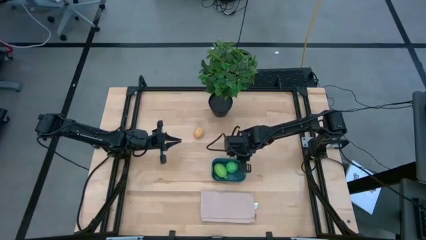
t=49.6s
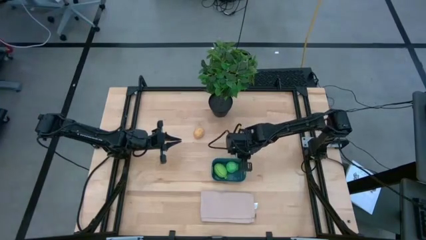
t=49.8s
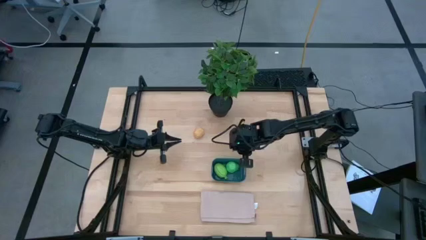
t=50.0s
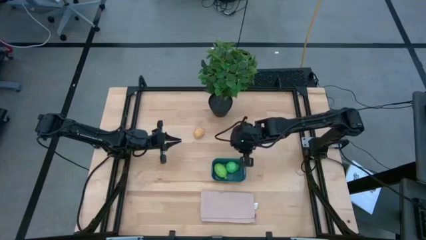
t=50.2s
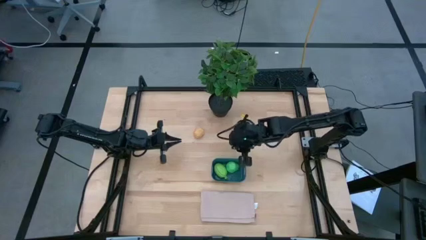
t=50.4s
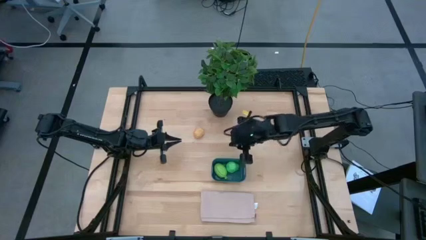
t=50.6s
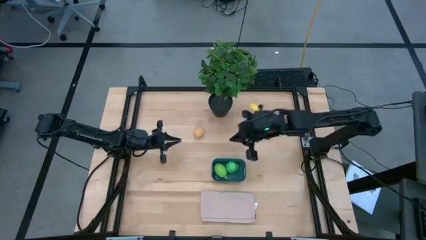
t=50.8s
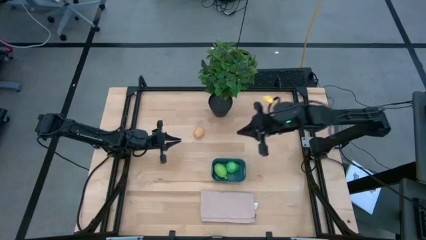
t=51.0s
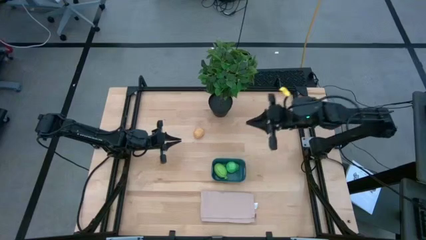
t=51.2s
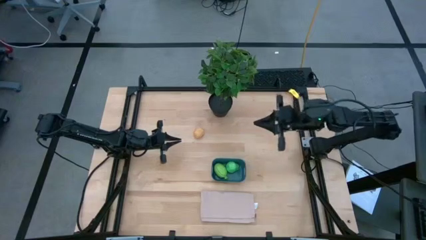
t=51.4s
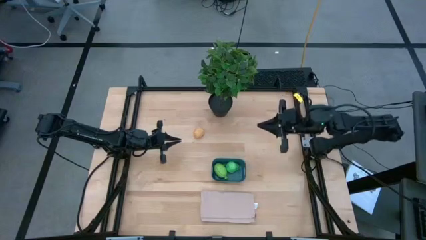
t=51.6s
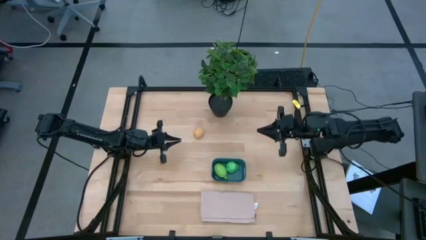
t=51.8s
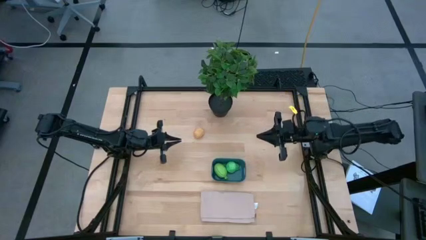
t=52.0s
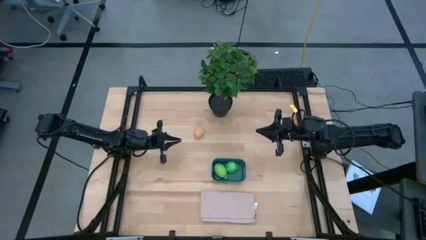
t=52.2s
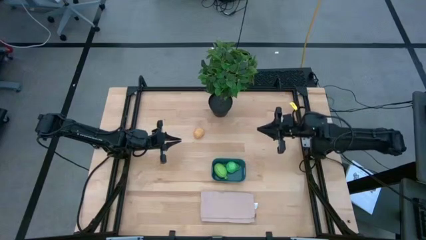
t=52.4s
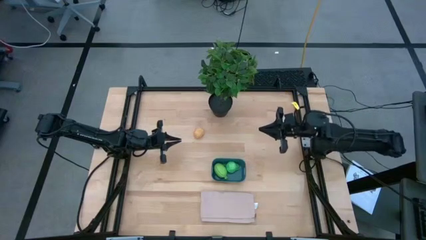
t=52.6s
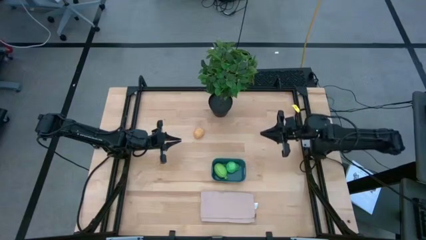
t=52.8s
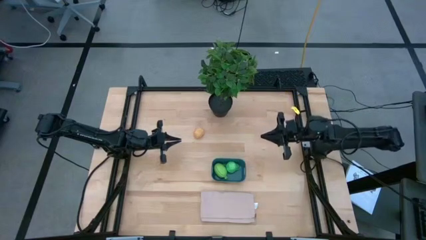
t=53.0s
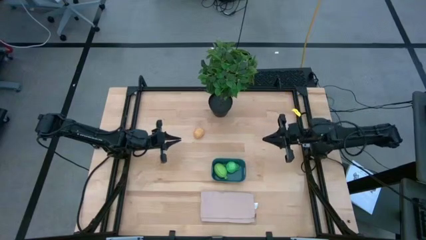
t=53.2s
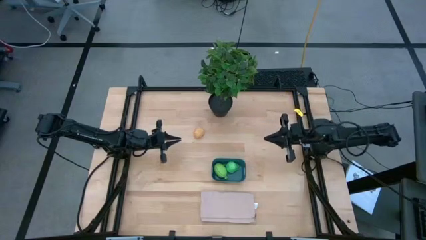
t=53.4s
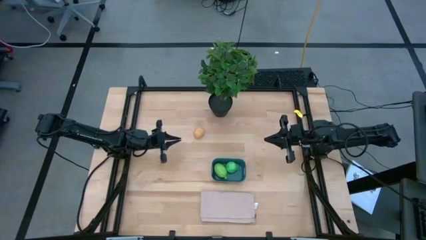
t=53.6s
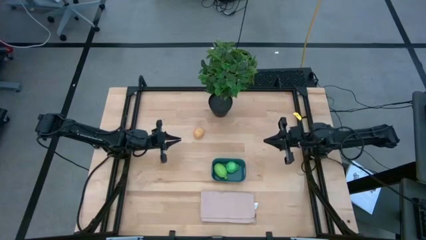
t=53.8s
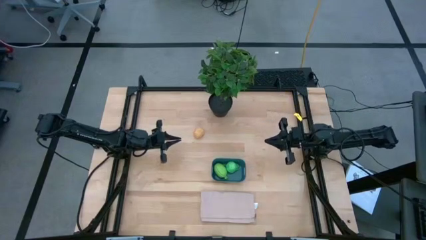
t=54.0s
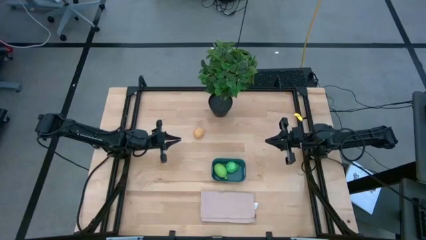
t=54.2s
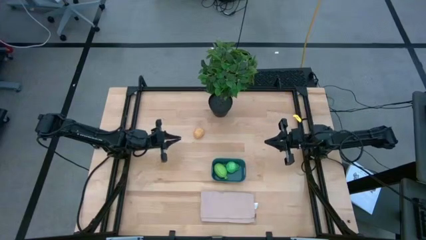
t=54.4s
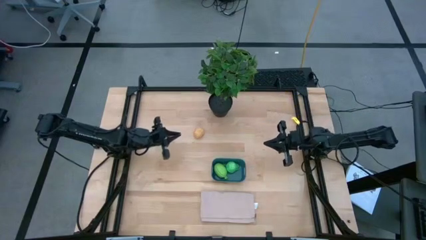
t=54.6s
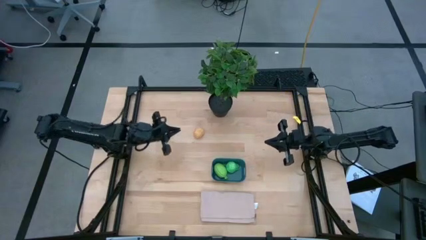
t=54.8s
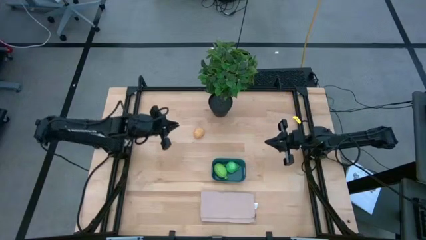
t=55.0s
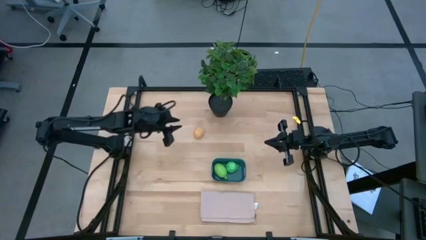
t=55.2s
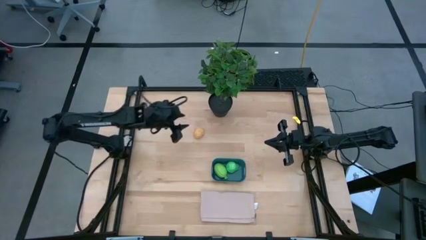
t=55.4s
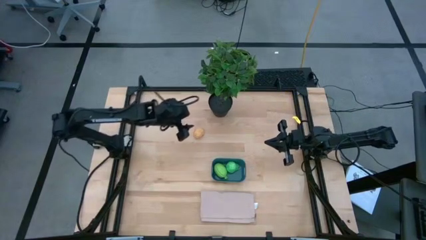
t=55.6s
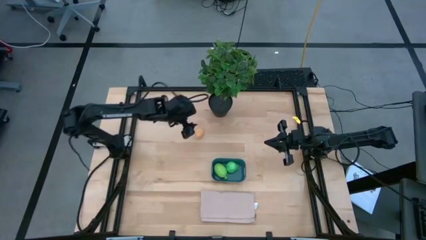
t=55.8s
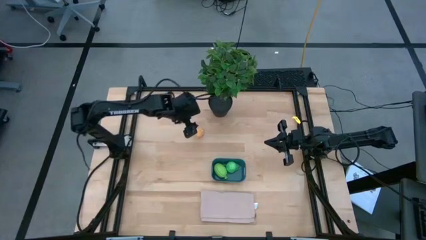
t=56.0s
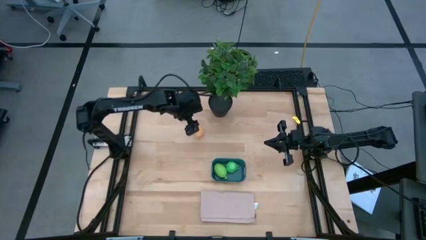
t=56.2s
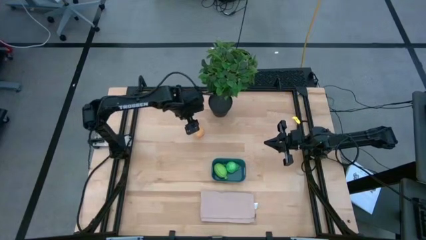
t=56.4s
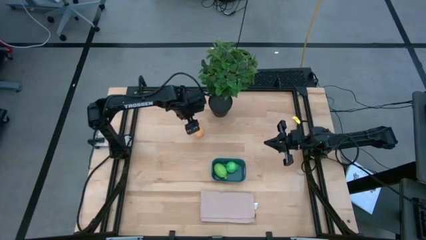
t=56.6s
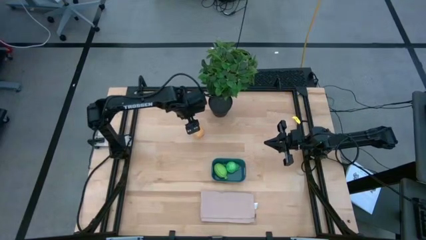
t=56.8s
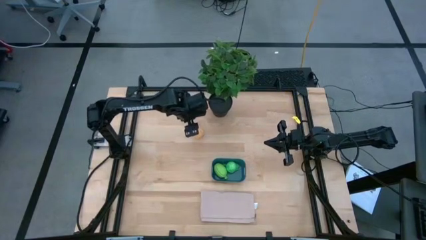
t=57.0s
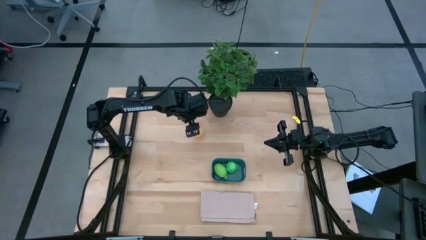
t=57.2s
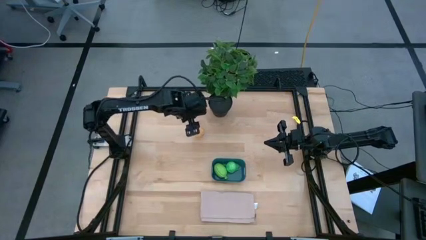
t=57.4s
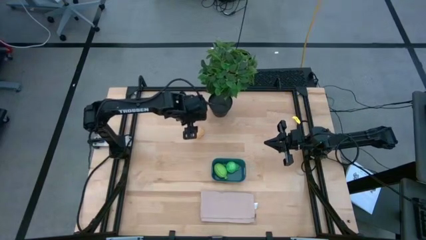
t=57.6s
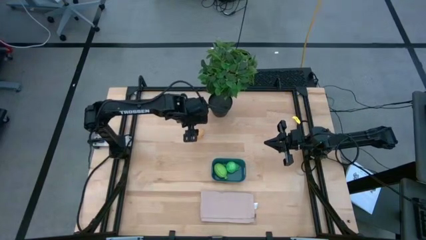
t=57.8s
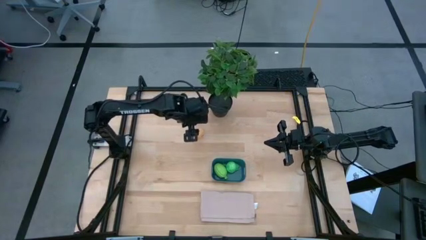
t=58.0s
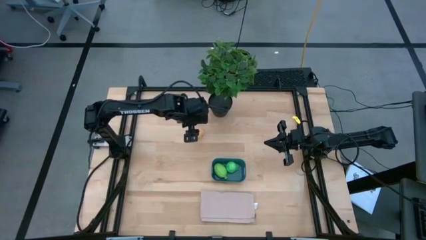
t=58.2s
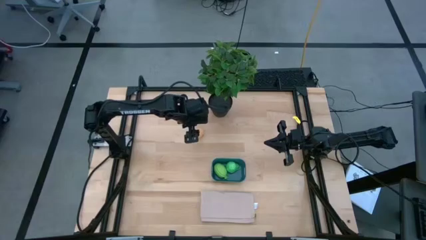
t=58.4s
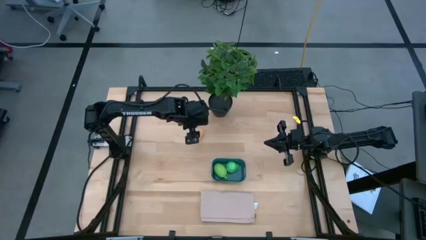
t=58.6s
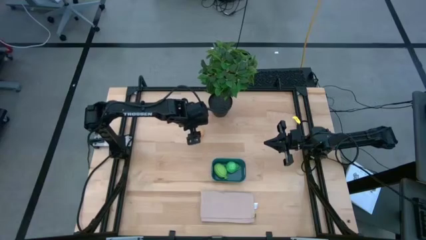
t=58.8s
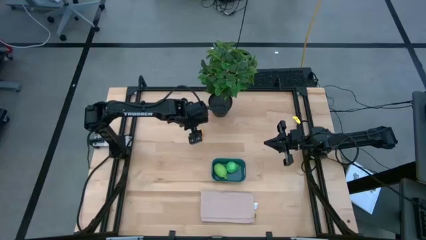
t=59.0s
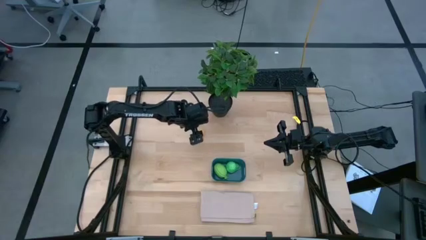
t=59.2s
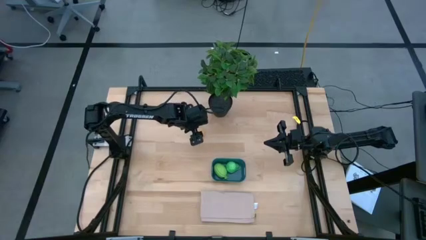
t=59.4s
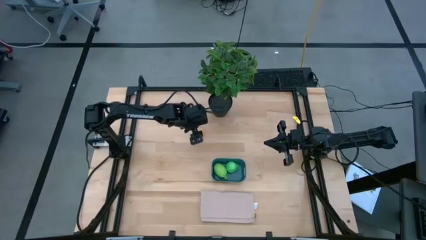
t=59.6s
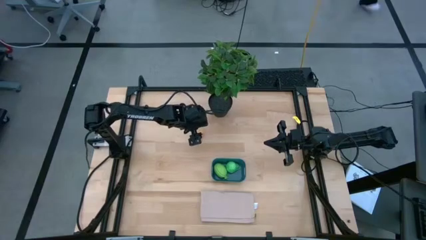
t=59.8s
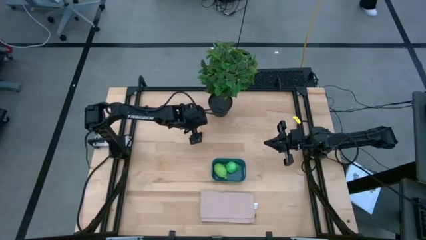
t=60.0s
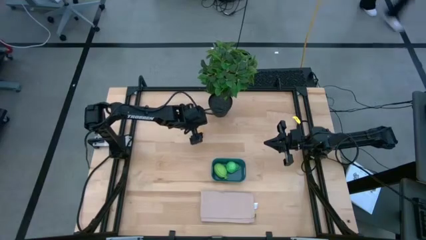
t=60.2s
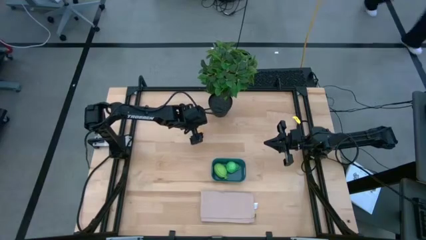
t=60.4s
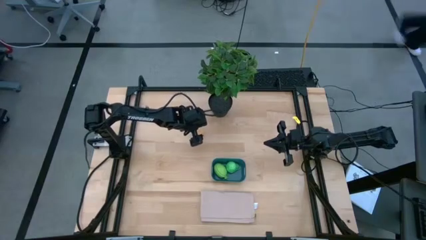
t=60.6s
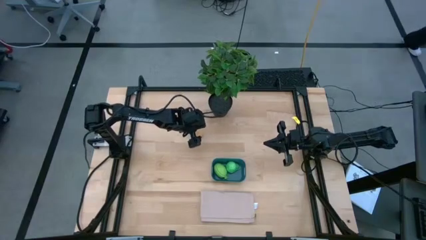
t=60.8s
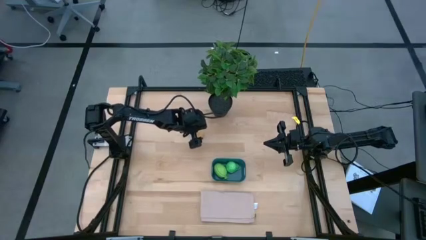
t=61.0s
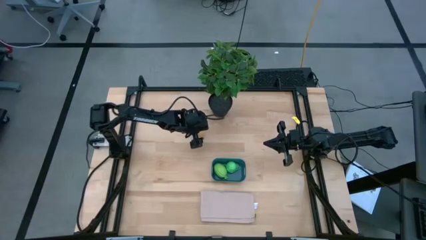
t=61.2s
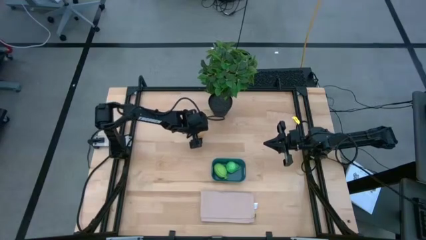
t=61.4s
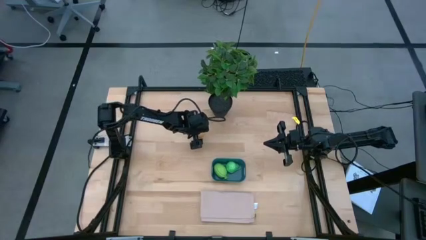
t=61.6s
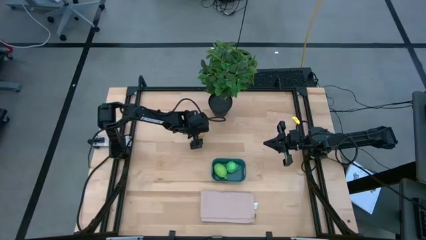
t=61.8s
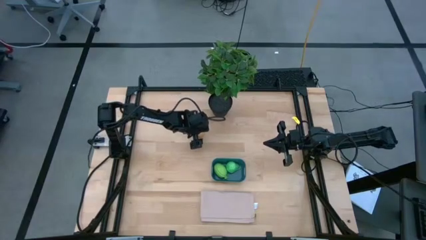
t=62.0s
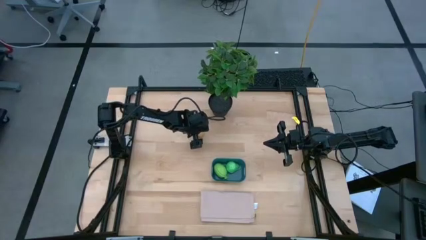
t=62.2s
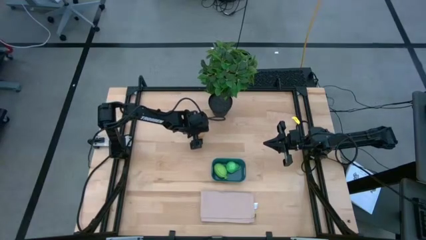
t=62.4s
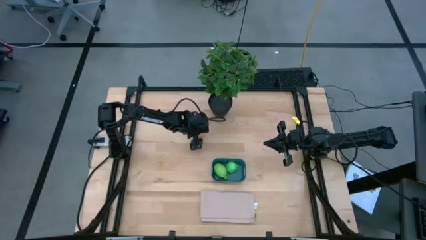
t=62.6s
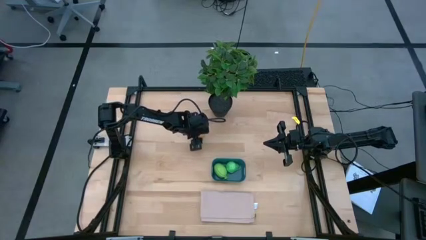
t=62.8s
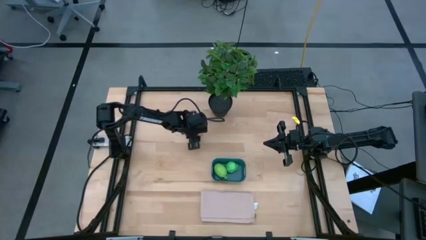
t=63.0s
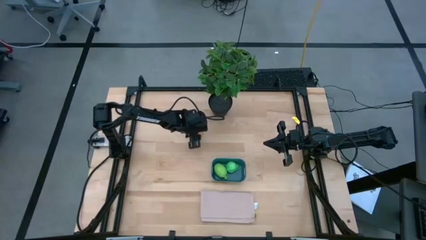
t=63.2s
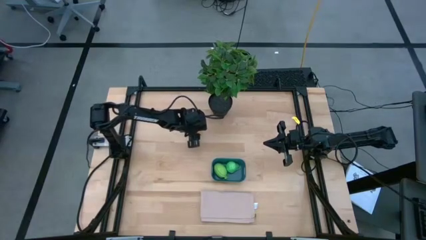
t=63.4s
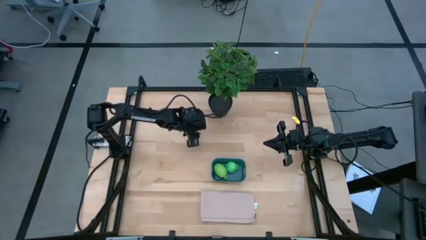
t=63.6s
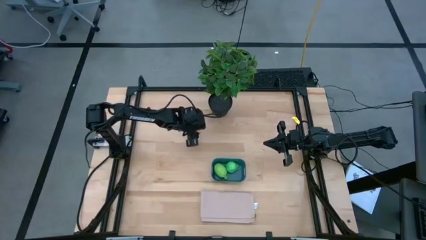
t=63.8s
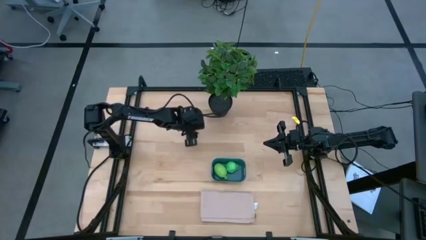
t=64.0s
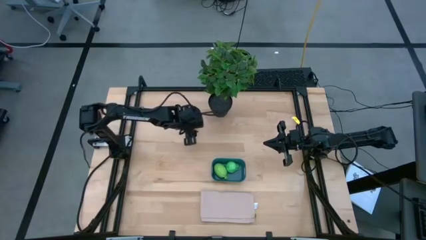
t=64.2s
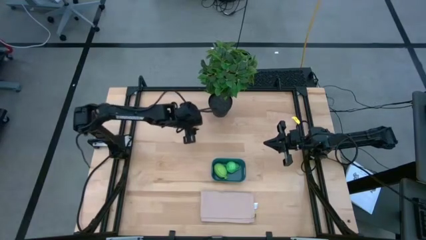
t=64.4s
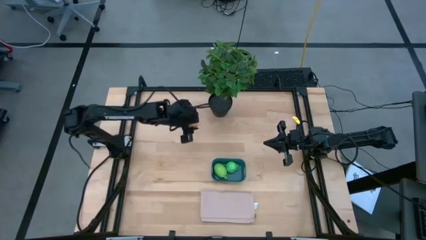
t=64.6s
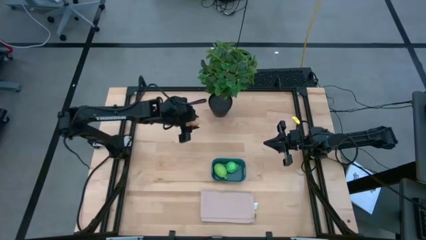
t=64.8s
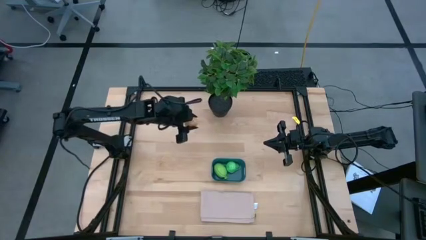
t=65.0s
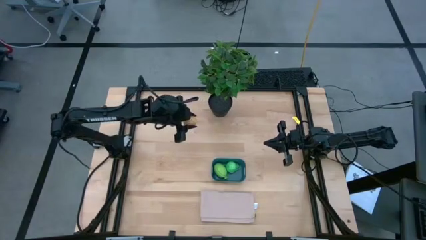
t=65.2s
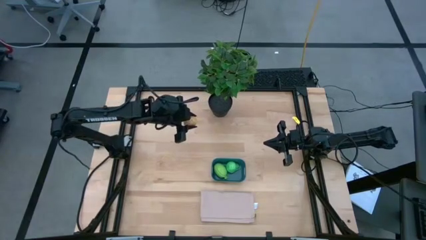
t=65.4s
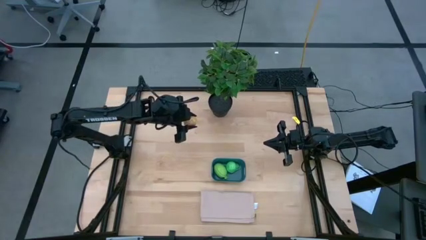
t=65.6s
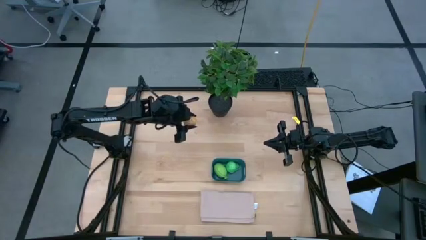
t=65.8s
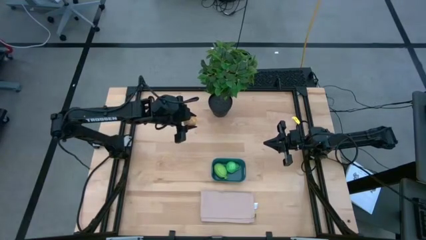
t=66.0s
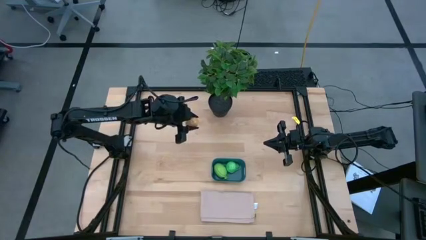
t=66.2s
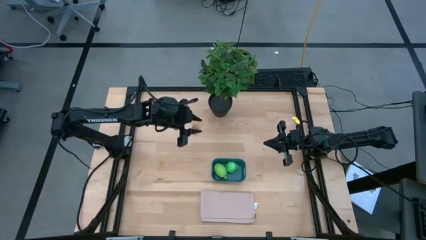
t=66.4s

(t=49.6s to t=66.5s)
Task: Pick and placing Produce into tupperware
Put the brown potato into the blue bin
